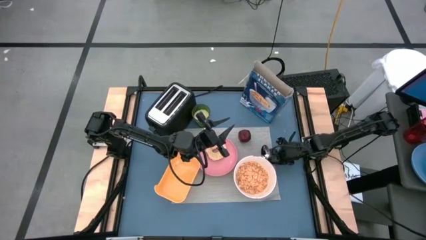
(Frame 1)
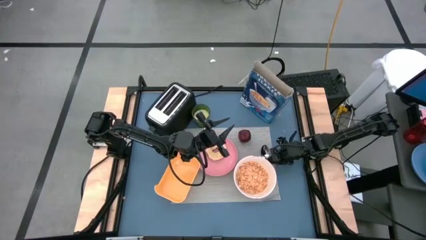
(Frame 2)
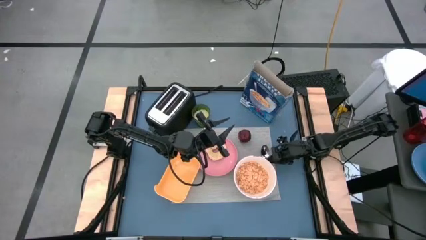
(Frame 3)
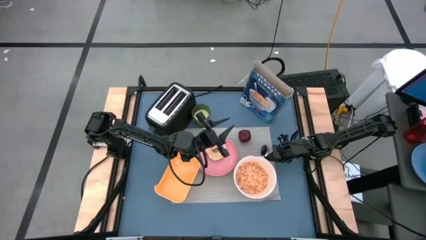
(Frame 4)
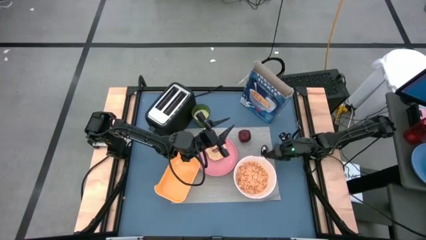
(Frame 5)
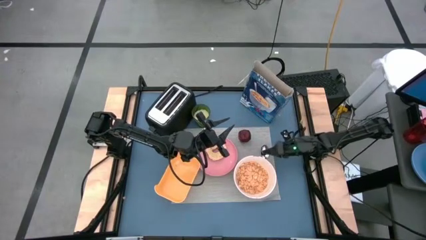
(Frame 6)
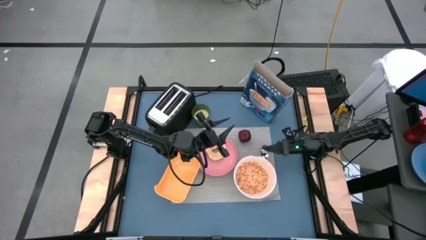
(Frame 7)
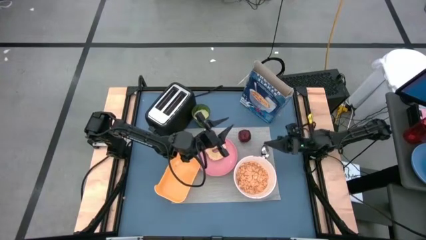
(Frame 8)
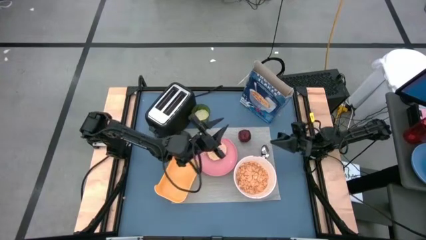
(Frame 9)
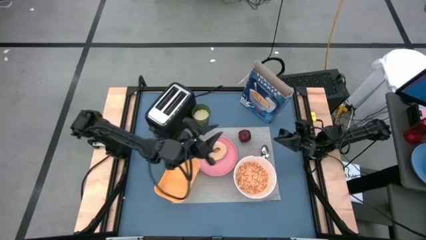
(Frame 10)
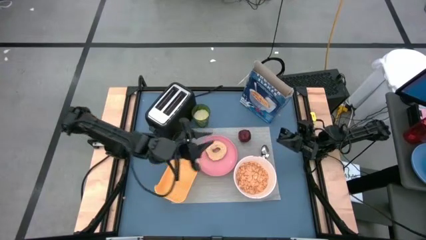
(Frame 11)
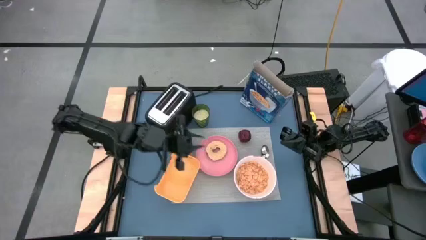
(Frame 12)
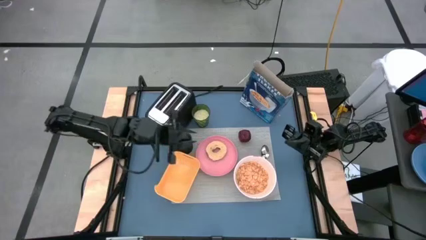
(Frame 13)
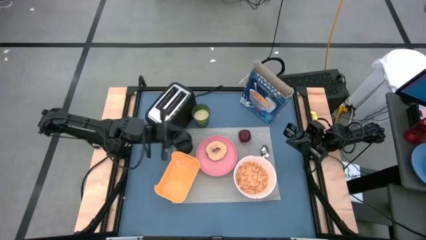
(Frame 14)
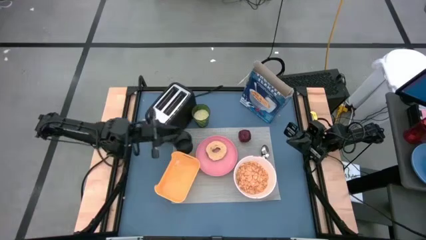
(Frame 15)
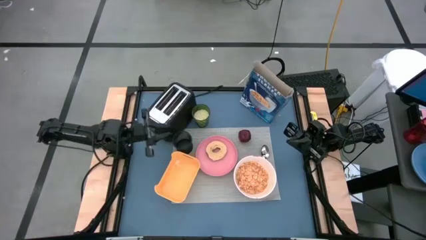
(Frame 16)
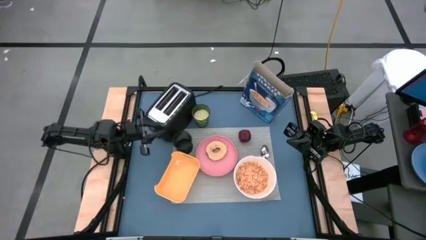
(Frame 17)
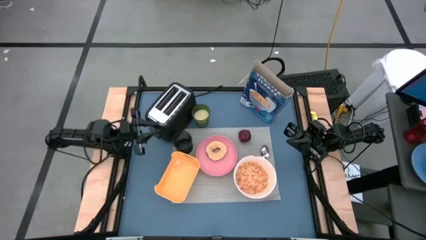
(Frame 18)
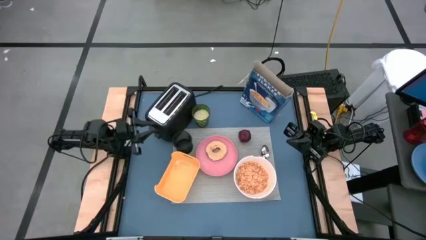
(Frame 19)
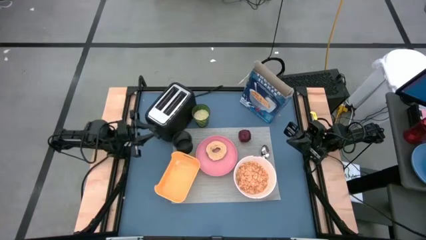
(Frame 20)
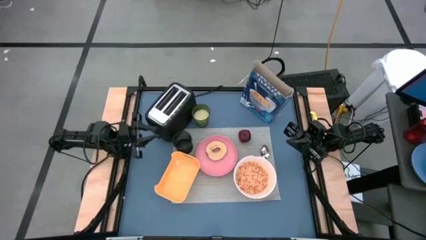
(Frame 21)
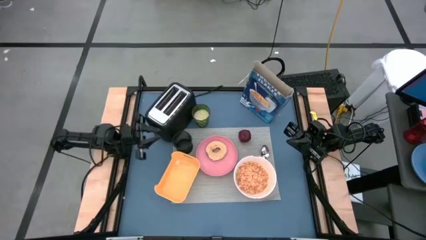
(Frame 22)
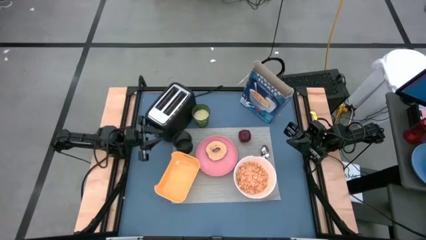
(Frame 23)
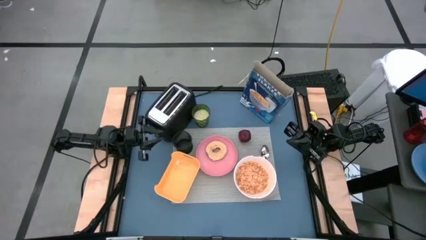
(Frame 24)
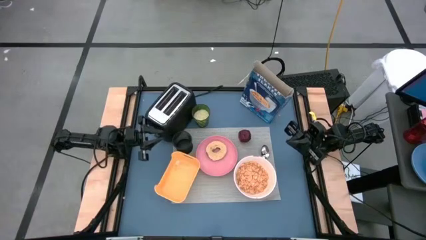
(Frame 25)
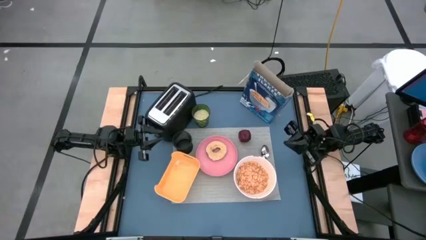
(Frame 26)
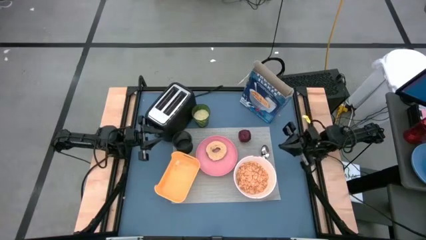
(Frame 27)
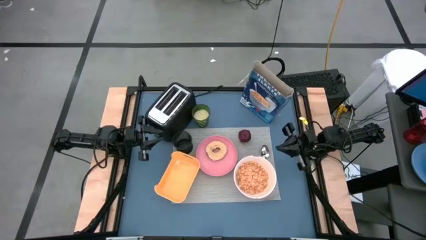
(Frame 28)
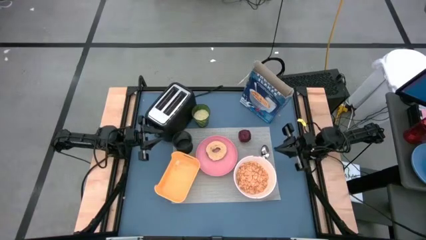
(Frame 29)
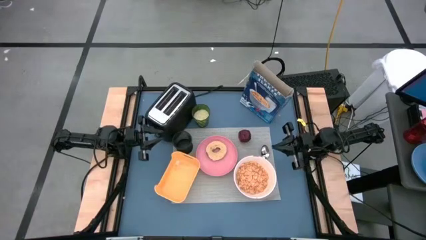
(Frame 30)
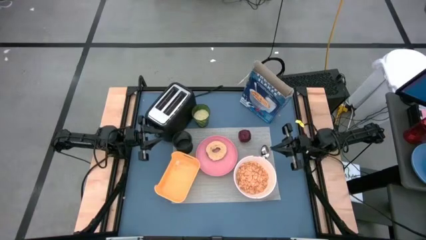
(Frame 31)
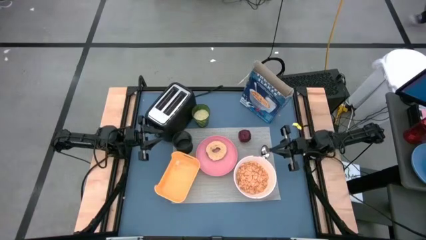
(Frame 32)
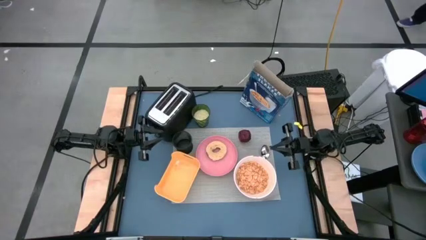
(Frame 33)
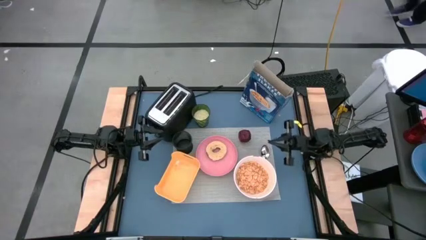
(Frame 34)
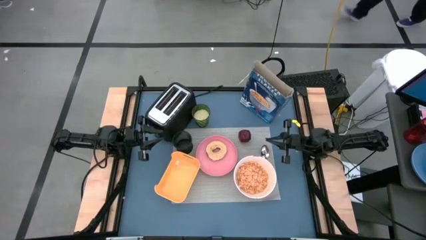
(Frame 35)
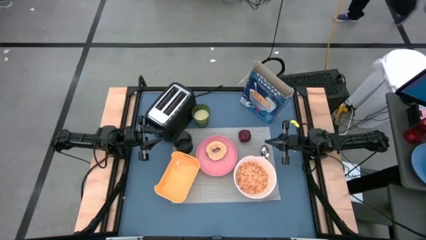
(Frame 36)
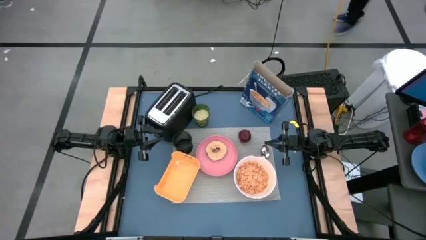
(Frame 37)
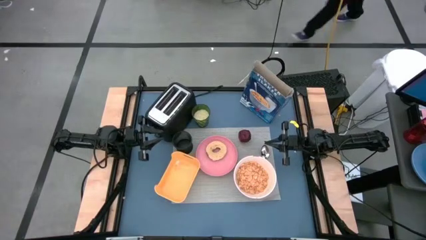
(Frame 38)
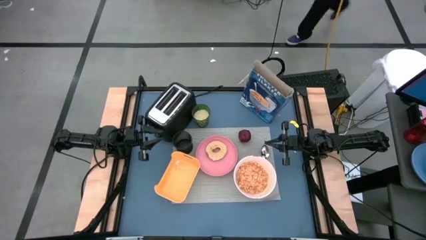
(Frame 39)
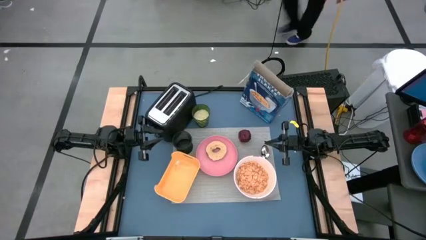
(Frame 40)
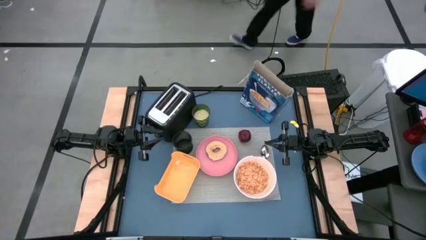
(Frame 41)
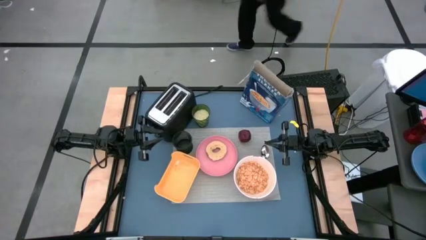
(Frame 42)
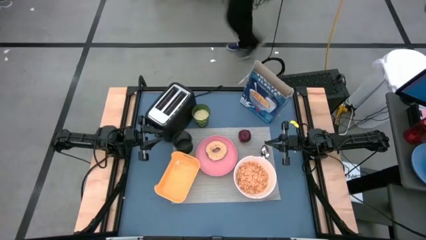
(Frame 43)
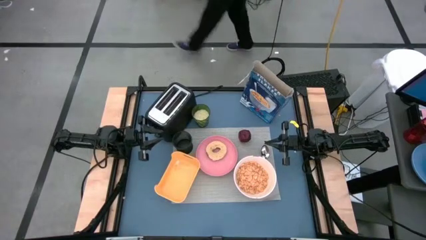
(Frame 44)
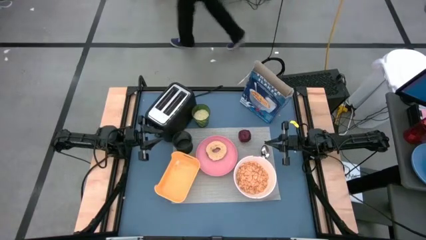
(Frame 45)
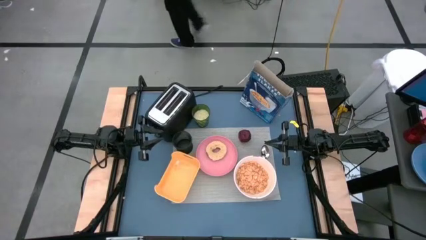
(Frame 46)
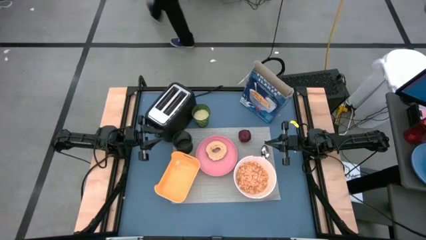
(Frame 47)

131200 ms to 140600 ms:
Task: Arrange a breakfast setting
Return to Home Position

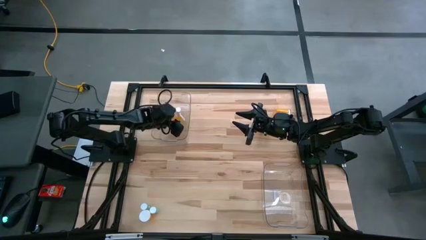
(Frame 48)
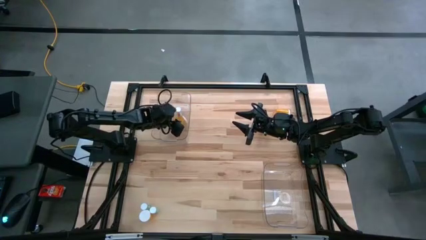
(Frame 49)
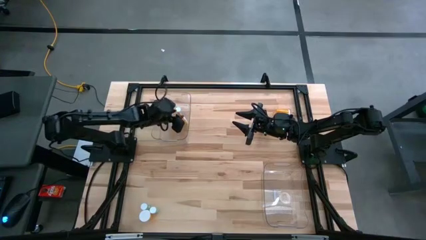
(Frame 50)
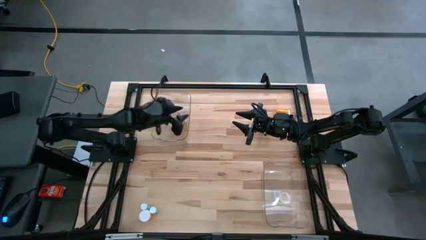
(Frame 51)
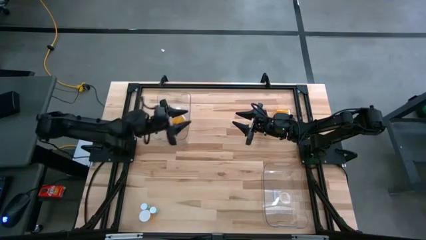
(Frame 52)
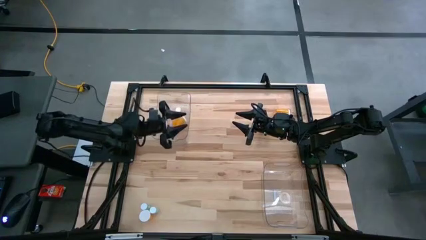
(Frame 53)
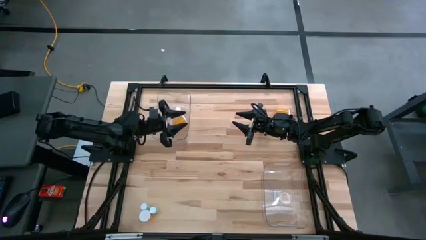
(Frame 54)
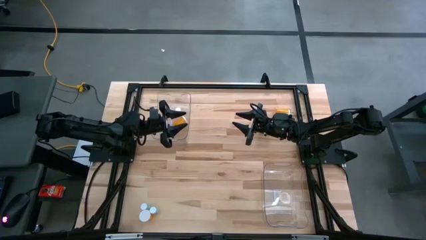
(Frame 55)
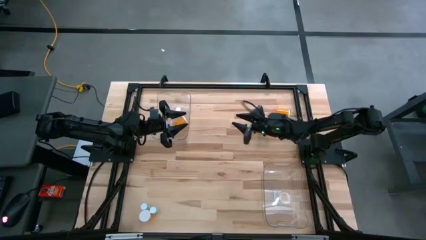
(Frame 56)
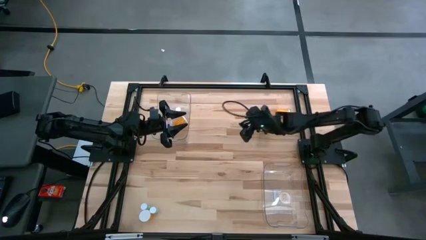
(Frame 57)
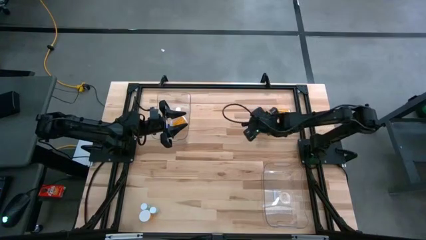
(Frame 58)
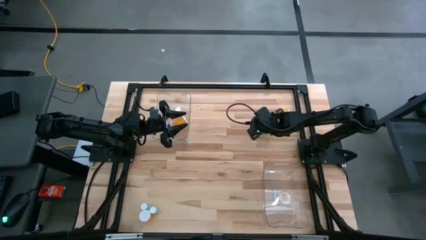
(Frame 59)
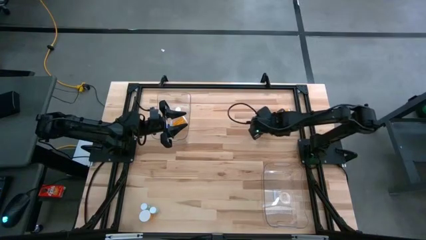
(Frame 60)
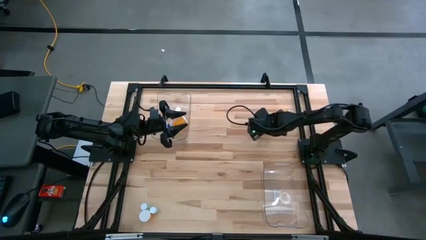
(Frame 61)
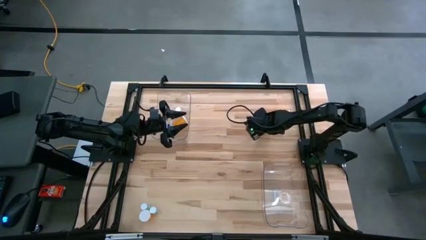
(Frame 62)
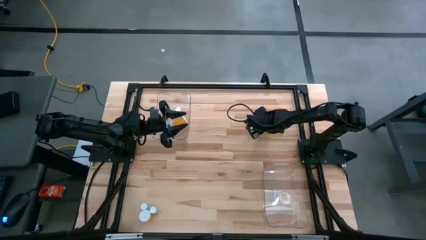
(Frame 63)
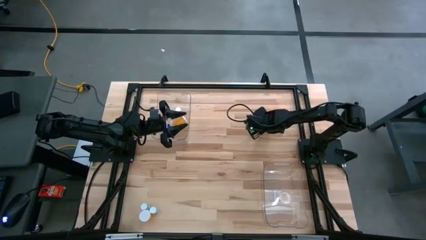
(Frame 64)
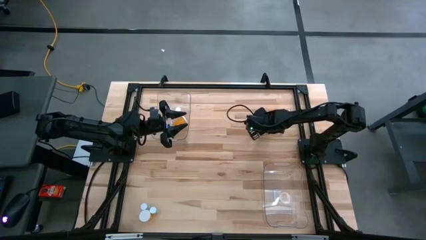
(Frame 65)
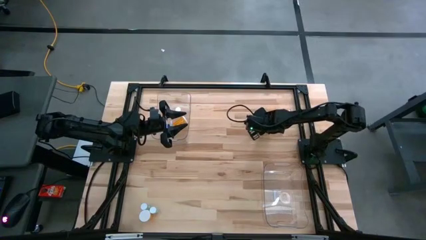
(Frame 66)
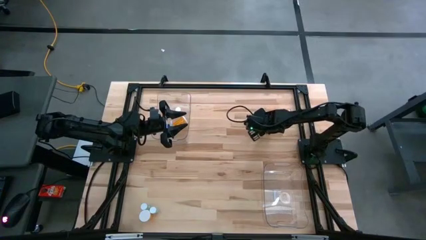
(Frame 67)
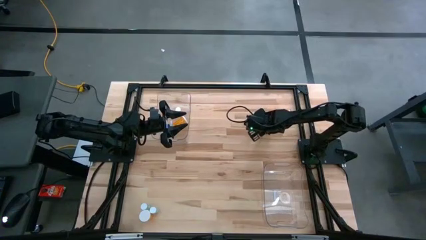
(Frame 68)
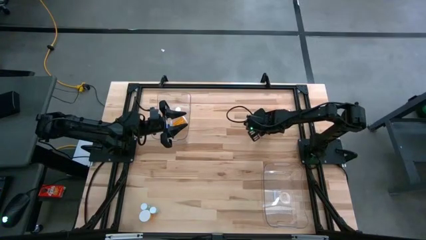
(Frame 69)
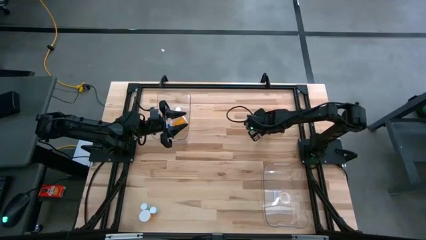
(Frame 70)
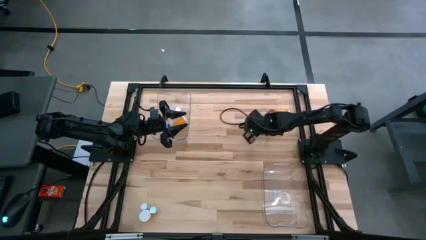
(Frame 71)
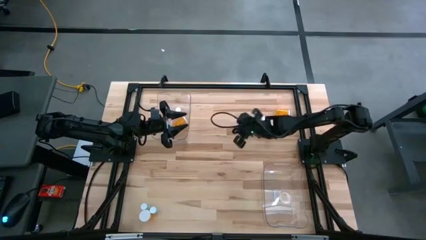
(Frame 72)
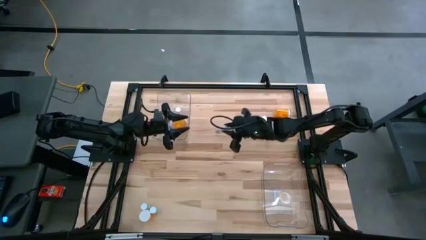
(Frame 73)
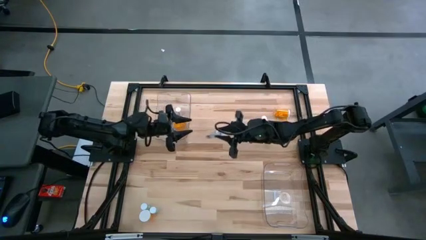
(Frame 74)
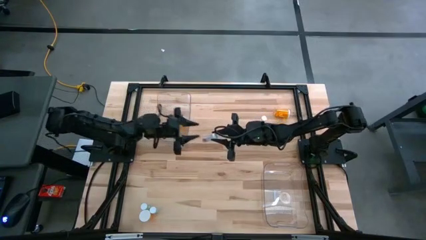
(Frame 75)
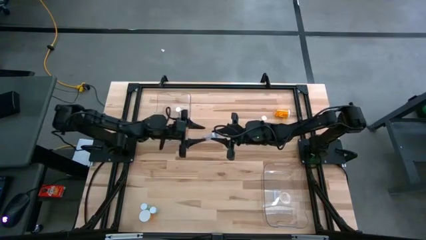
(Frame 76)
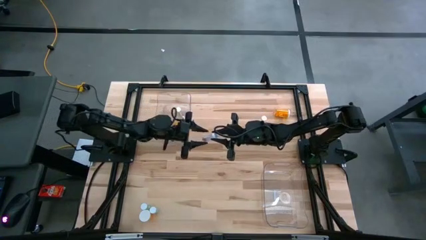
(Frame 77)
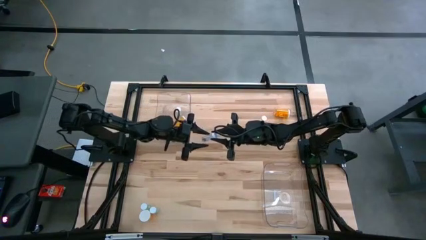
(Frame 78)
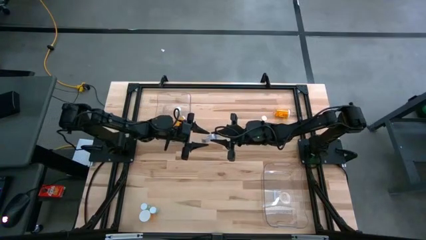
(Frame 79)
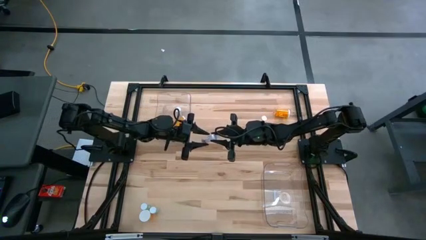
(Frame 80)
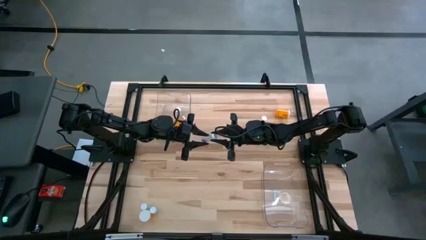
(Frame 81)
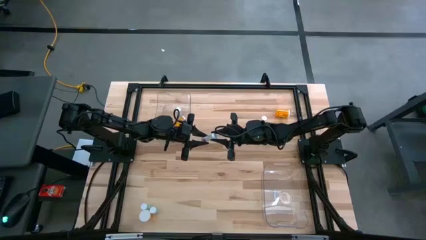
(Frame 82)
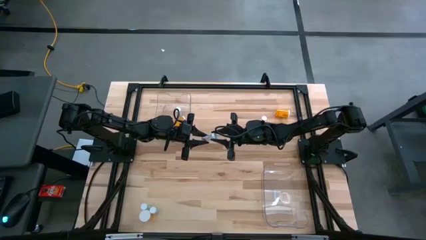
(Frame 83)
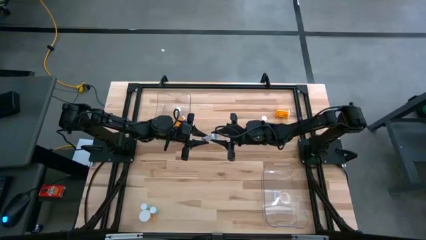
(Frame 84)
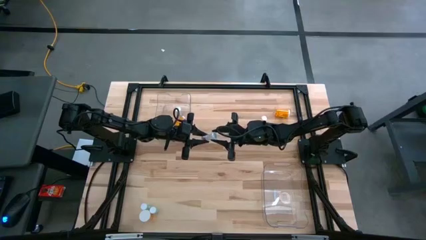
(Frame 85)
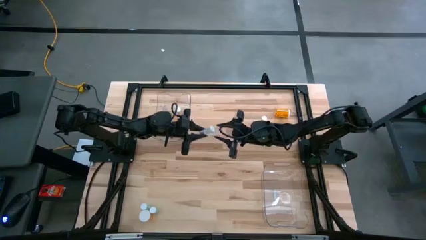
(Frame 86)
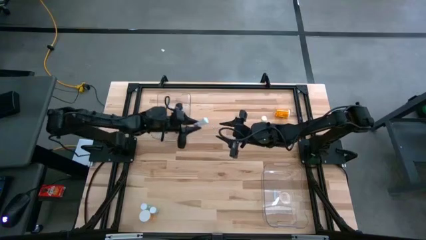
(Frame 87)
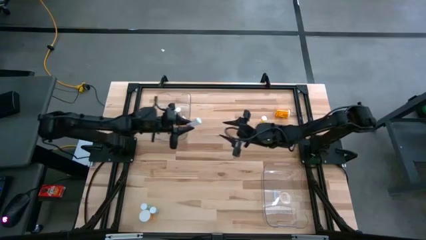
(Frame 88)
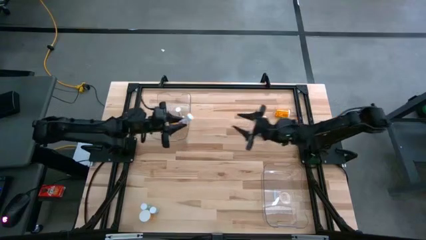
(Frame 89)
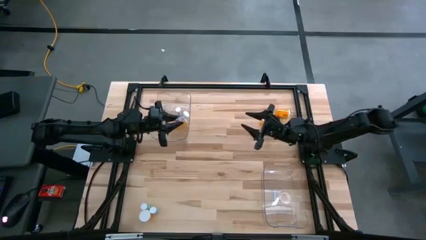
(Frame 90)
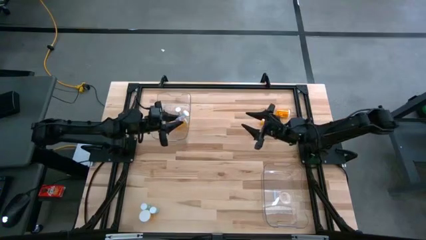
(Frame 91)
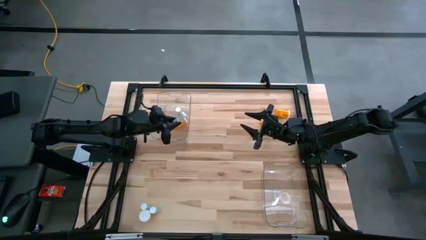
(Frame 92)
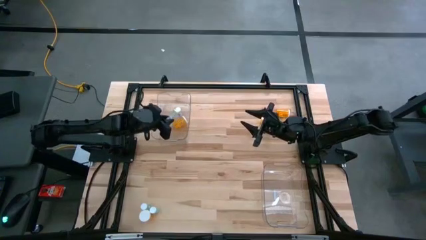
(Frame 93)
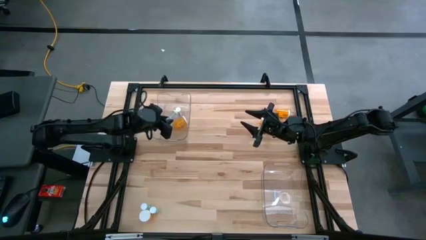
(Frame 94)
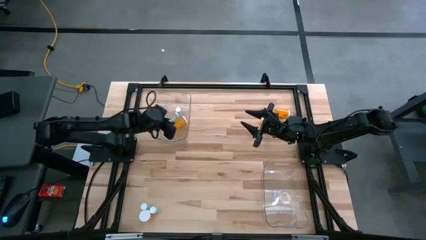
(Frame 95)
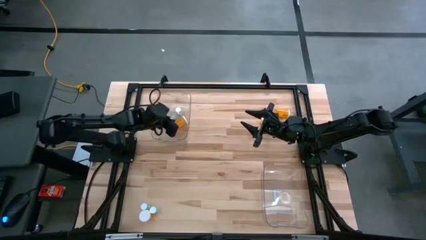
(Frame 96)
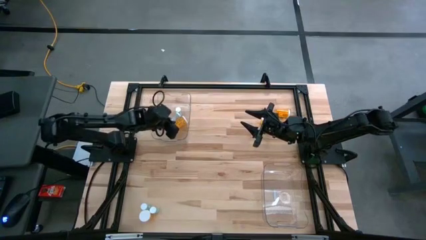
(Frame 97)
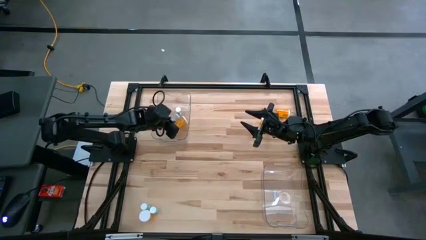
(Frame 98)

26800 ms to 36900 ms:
Task: Pick and place medicine bottles into bin by pill shape (circle, oval)
Put the blue capsule bottle into the left transparent bin
